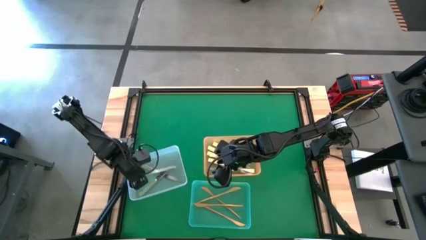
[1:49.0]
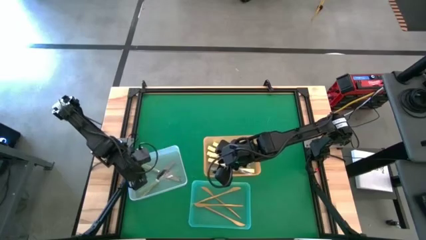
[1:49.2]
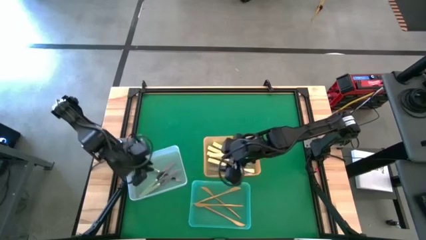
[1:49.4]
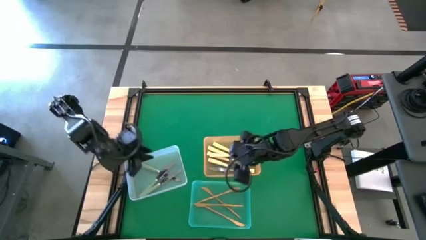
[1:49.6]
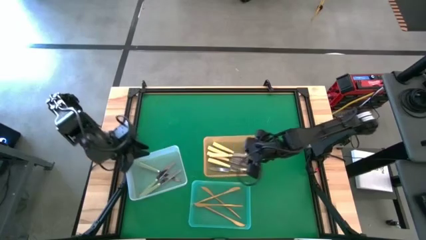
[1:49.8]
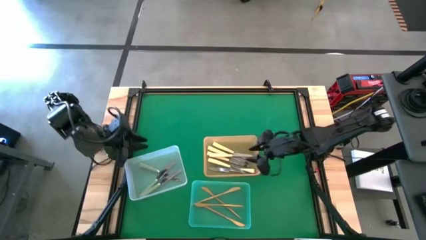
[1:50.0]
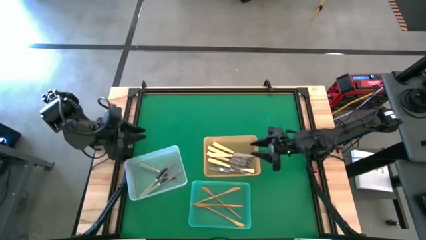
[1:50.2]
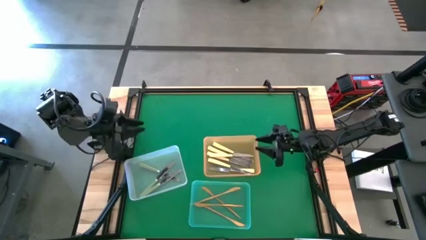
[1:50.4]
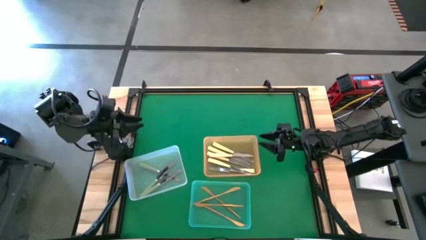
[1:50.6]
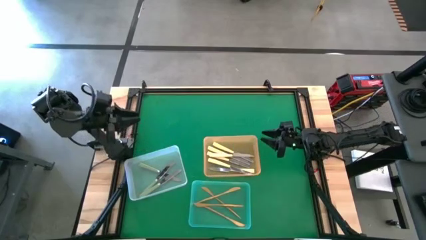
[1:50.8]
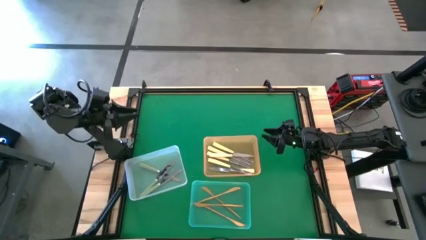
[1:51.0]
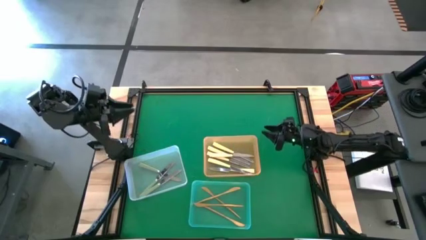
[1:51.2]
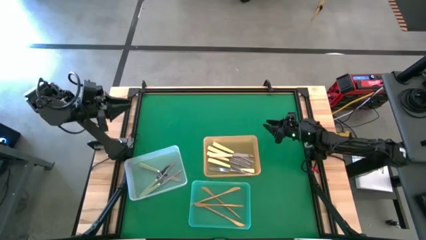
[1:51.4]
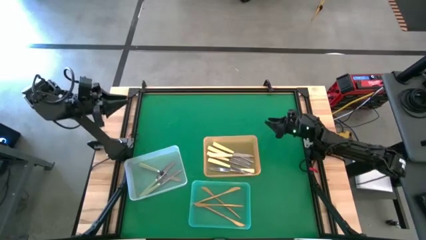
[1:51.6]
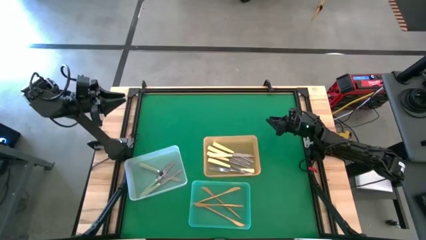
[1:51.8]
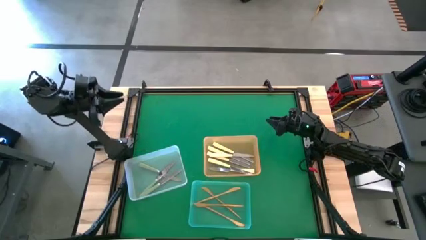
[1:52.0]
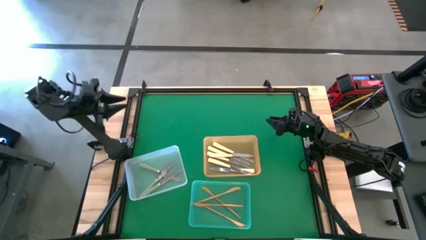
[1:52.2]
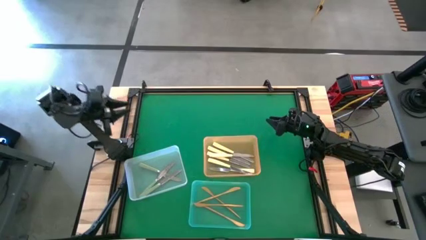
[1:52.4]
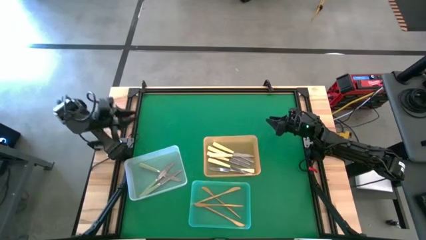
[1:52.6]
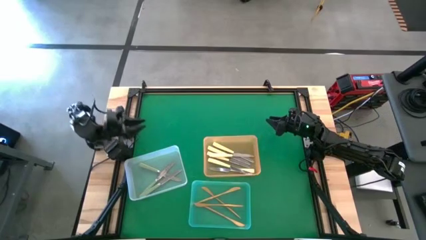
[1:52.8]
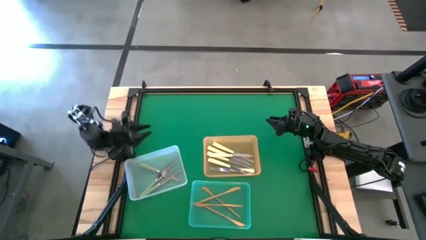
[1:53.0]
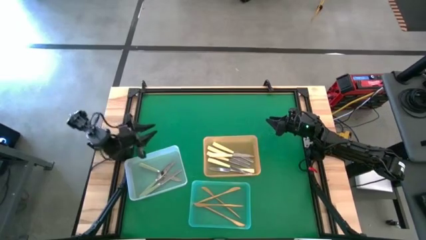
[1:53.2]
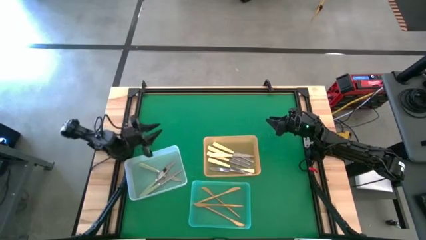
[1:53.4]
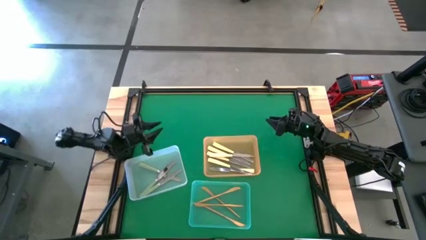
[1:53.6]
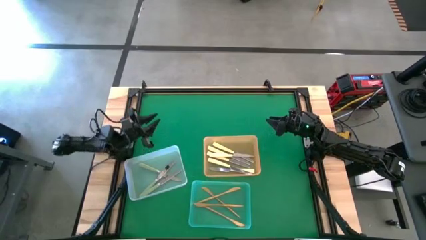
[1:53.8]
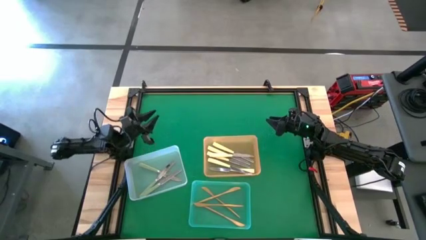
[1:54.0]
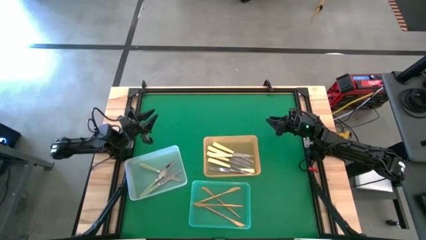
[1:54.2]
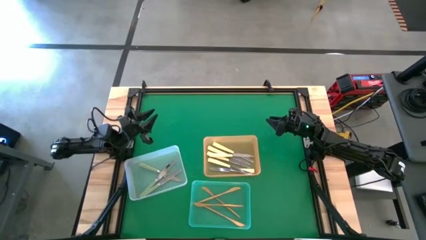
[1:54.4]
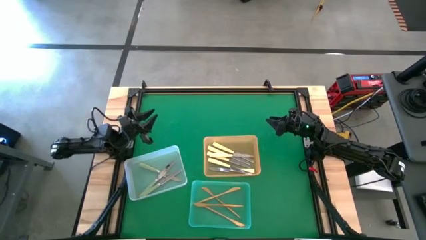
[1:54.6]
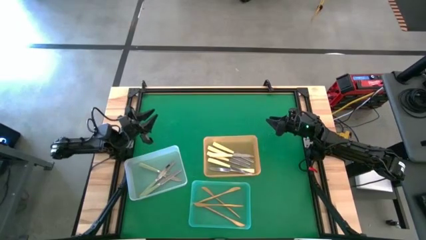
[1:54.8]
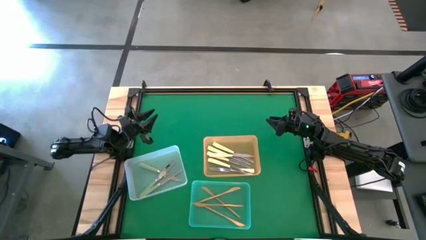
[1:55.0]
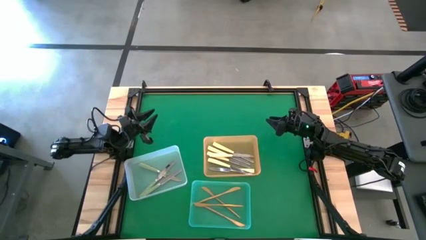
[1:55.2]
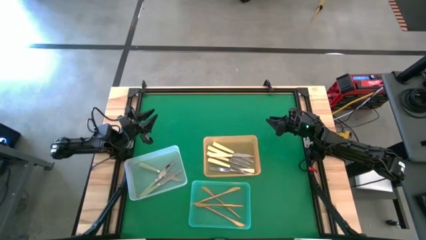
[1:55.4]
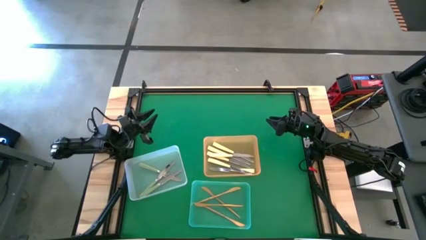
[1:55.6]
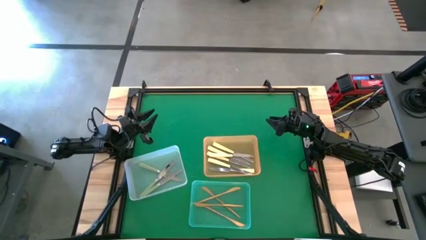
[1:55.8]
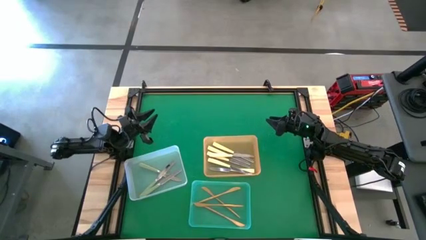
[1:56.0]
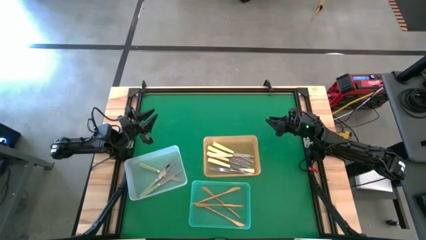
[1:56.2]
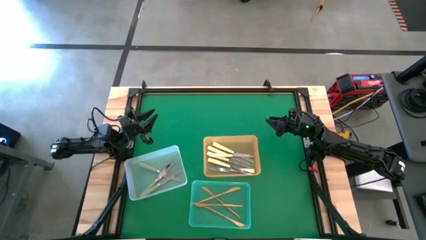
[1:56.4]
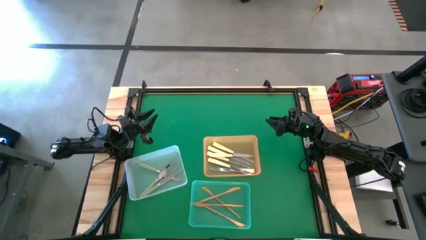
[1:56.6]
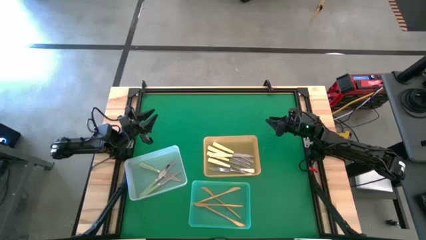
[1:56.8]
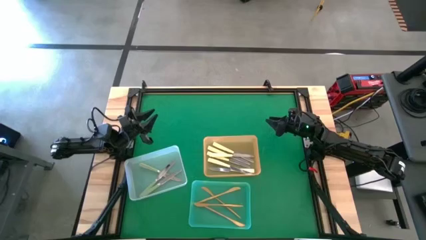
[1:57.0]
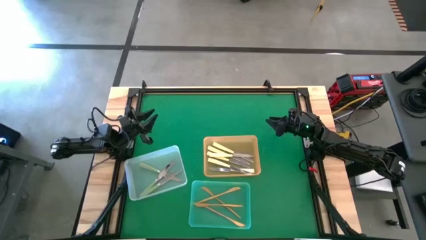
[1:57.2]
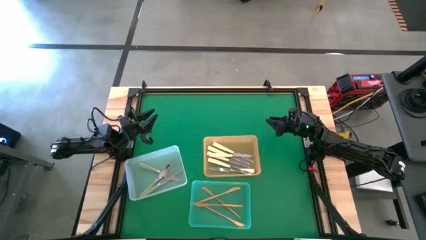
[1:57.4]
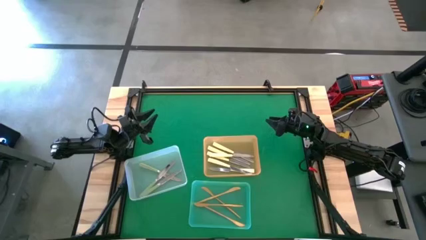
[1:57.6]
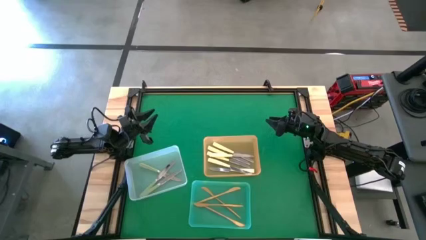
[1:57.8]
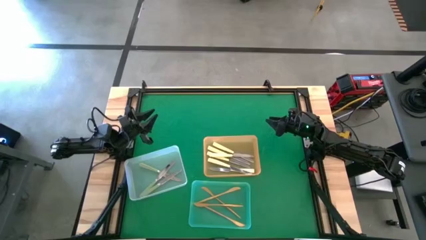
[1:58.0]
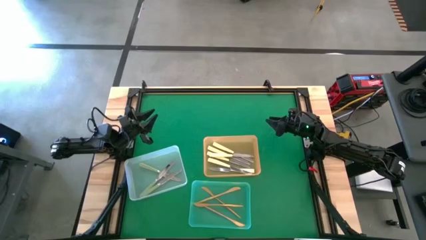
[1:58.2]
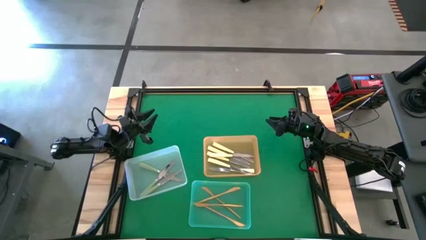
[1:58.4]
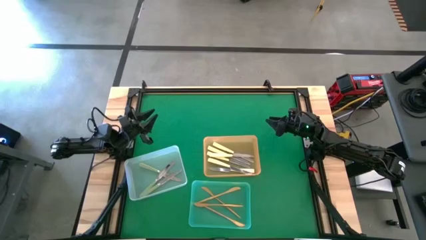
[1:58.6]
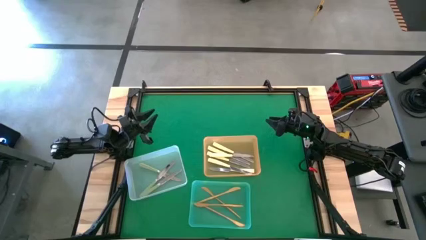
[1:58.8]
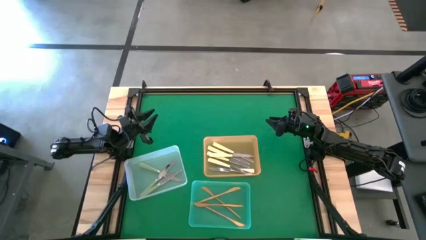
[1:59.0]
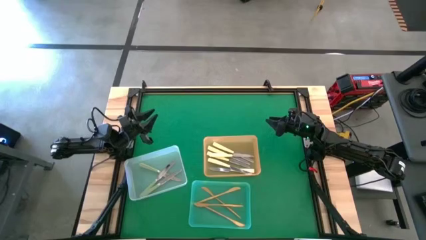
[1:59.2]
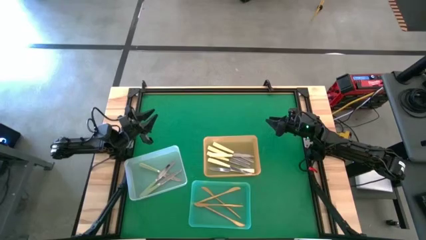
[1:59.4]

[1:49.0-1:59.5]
Task: Sort silverware by color (type)
Return to Home Position

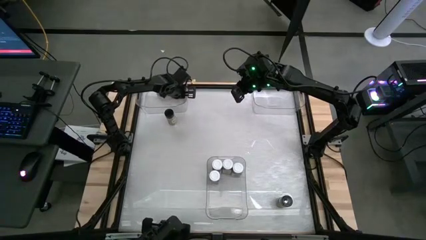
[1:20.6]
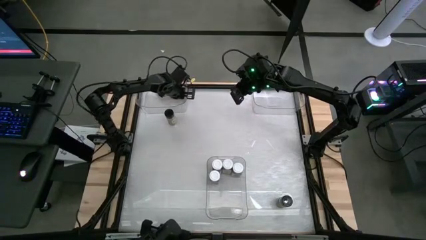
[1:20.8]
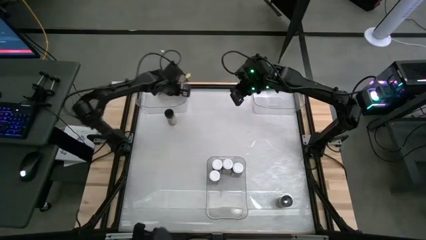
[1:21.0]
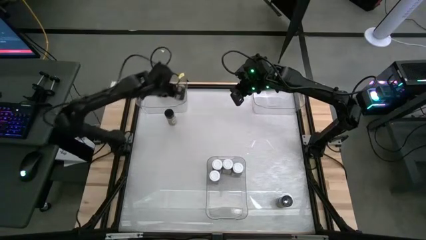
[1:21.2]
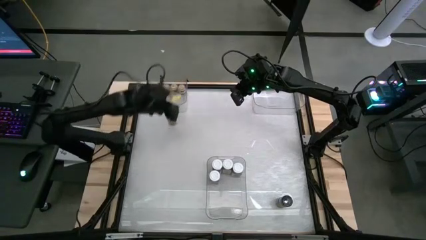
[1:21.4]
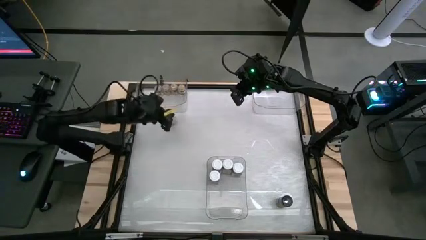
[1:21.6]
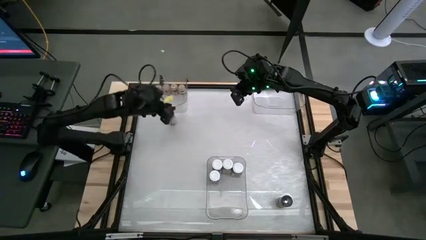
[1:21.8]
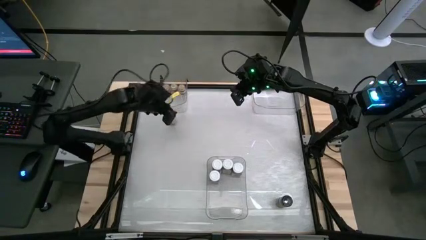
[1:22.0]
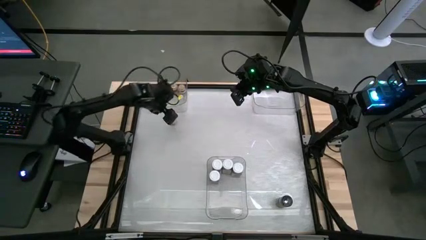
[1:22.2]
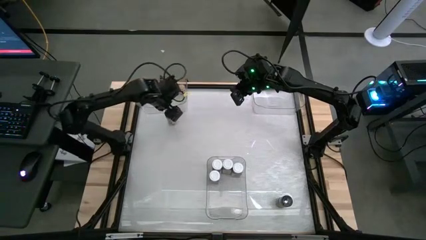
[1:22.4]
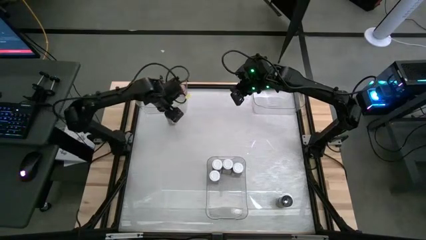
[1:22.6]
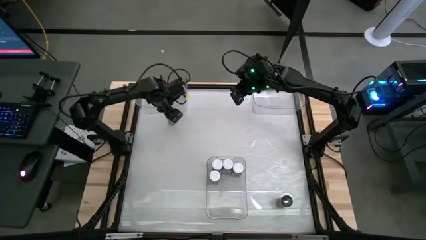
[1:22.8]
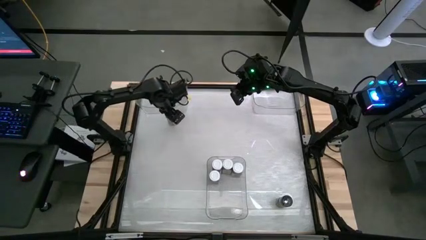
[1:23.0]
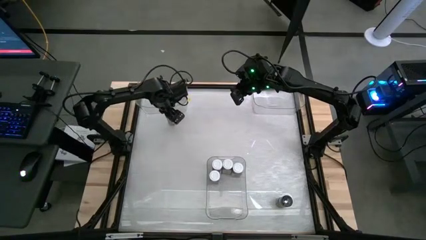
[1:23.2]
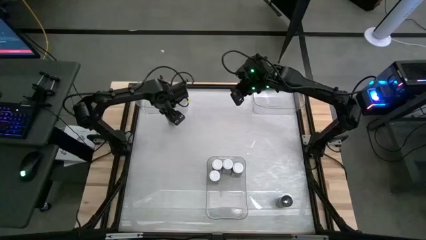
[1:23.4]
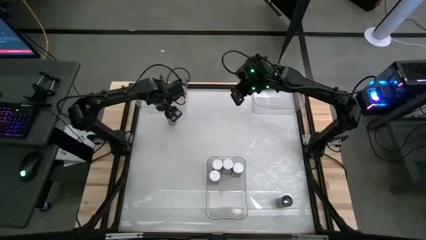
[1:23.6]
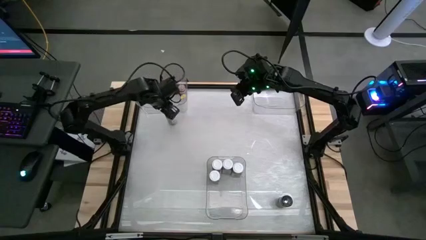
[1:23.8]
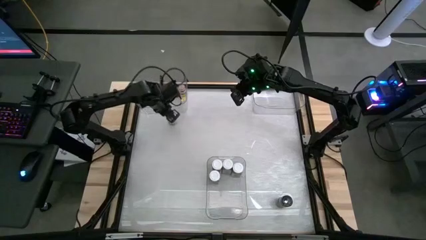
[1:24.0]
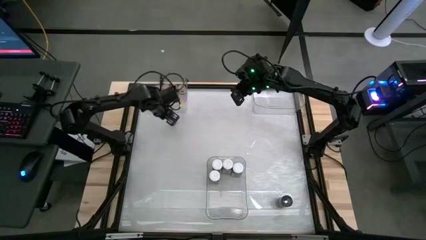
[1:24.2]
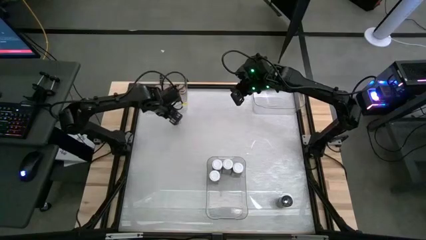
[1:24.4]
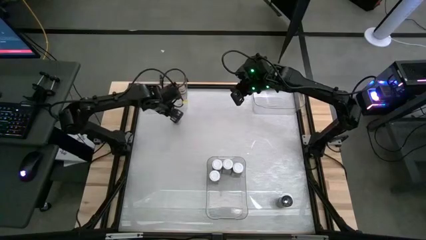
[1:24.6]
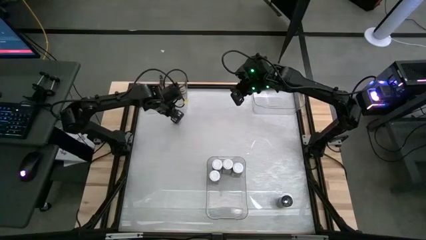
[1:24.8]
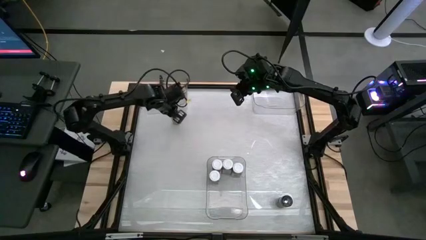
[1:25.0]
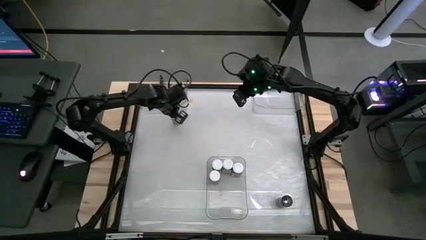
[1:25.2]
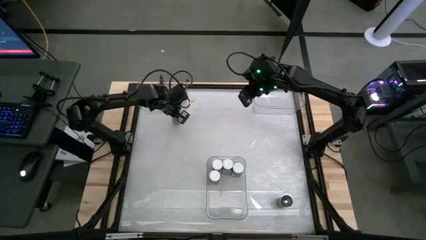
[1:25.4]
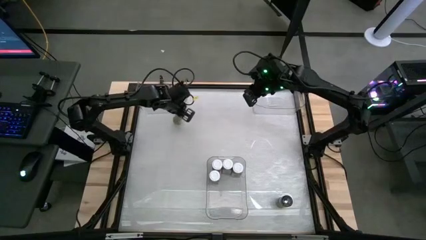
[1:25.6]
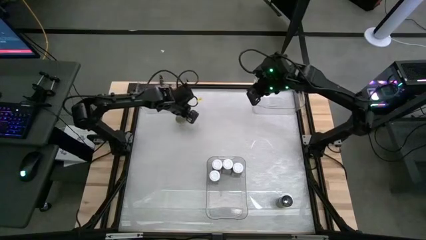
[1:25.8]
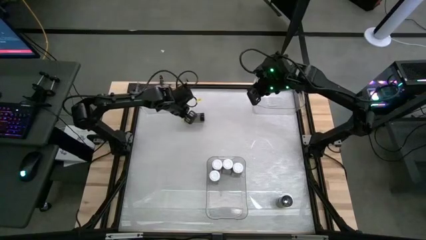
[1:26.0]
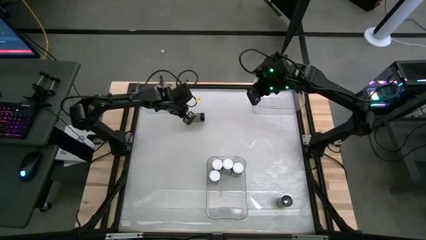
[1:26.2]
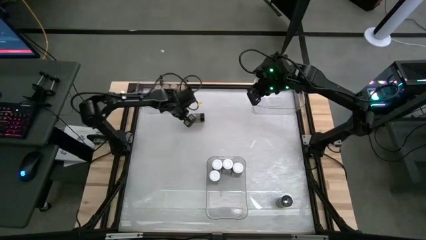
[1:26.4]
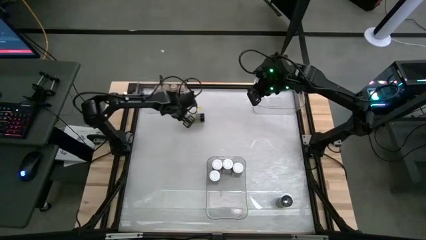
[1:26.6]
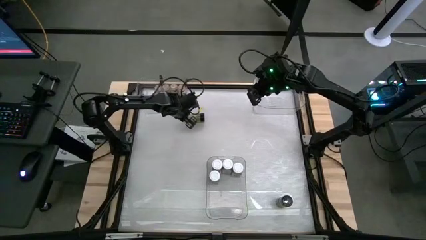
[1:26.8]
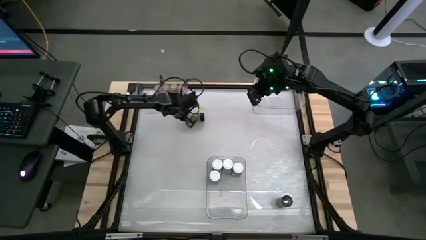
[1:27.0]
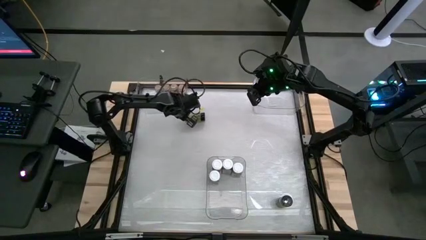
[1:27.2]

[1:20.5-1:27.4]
Task: Sort spices by type
Put the top black seasoning bottle into the top right transparent bin
